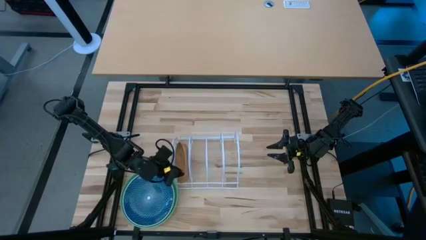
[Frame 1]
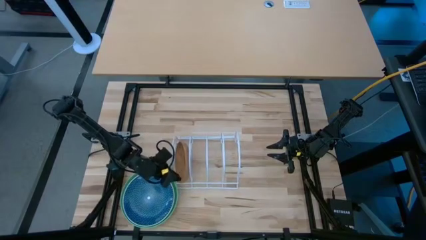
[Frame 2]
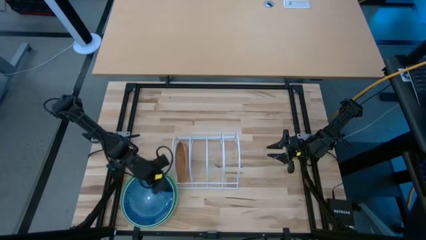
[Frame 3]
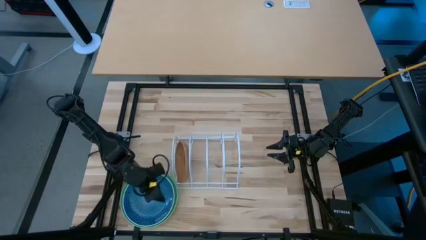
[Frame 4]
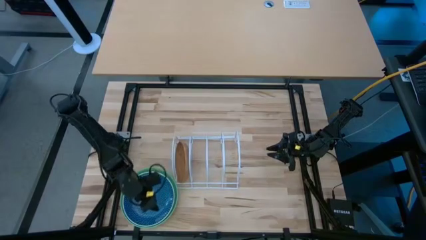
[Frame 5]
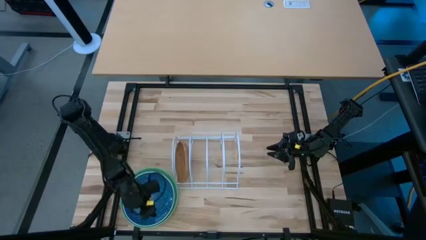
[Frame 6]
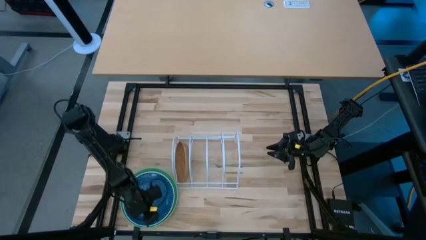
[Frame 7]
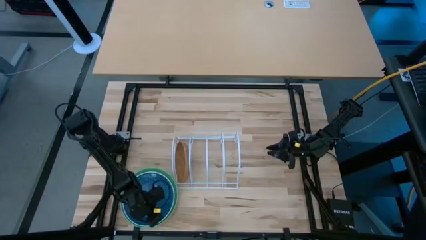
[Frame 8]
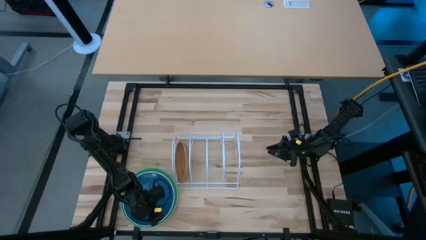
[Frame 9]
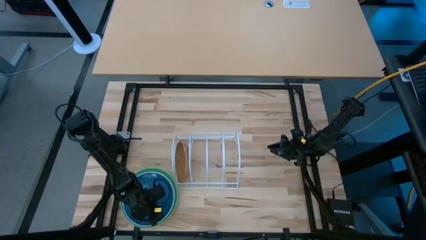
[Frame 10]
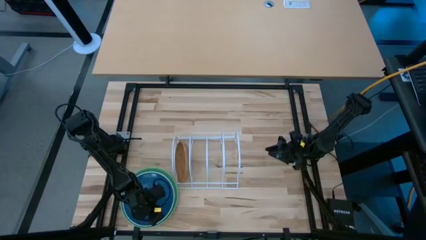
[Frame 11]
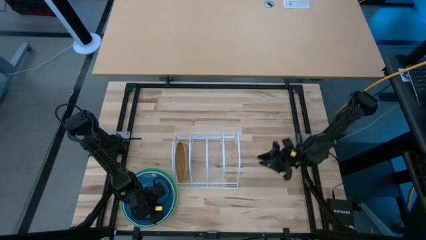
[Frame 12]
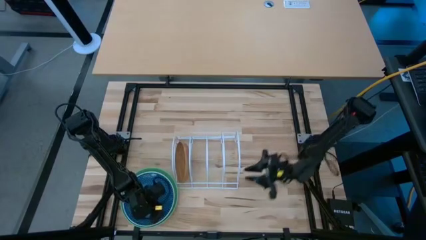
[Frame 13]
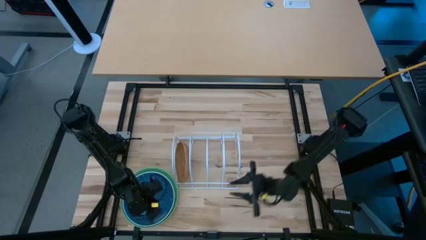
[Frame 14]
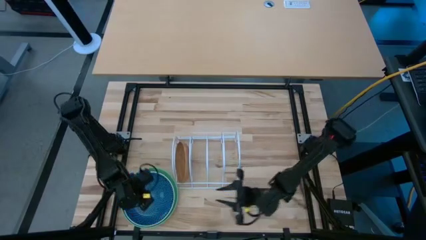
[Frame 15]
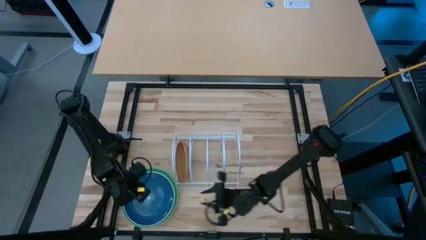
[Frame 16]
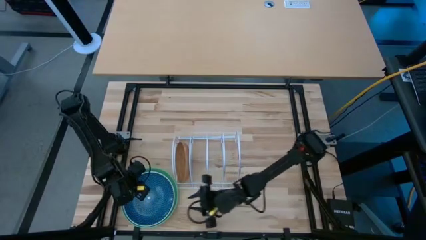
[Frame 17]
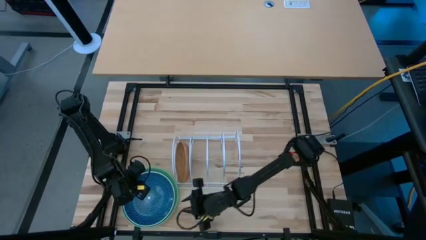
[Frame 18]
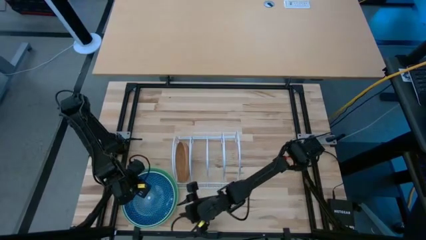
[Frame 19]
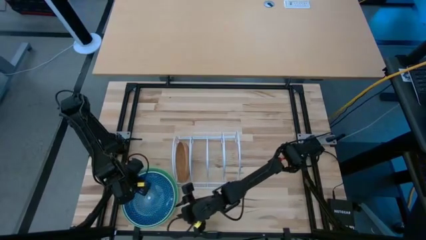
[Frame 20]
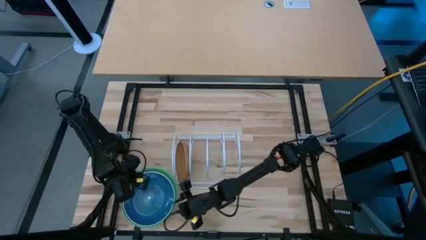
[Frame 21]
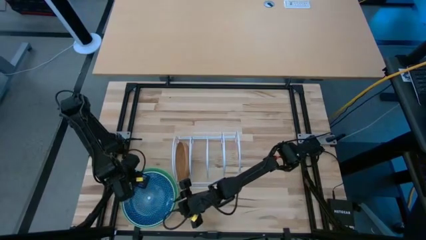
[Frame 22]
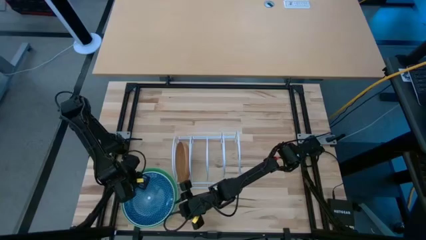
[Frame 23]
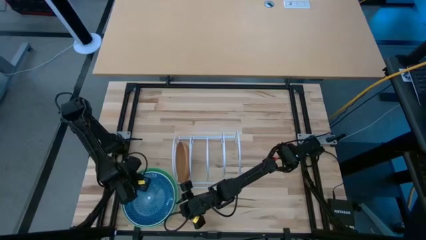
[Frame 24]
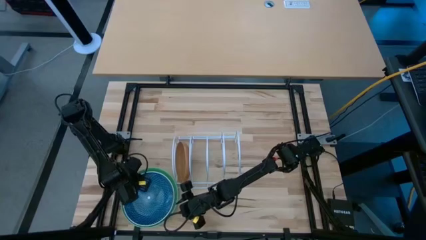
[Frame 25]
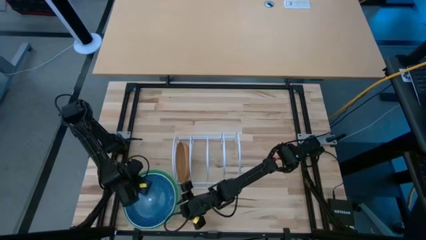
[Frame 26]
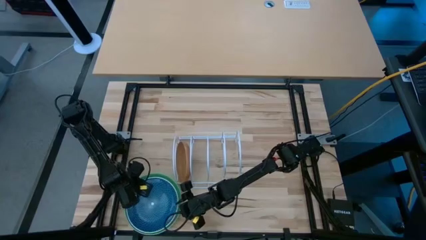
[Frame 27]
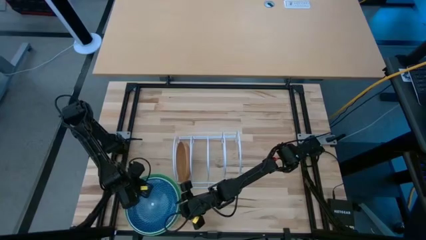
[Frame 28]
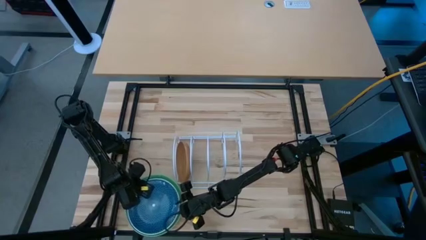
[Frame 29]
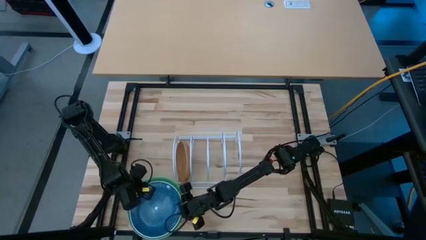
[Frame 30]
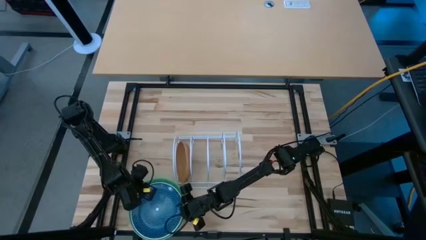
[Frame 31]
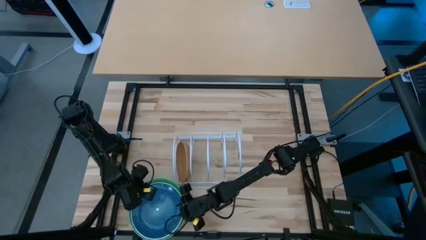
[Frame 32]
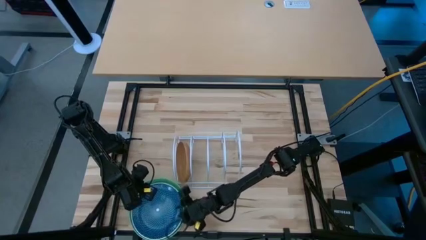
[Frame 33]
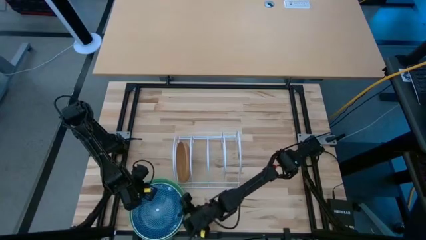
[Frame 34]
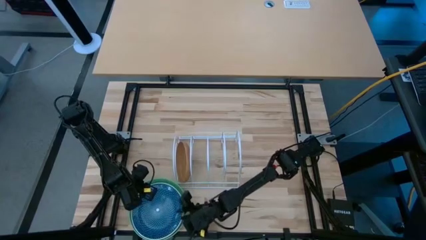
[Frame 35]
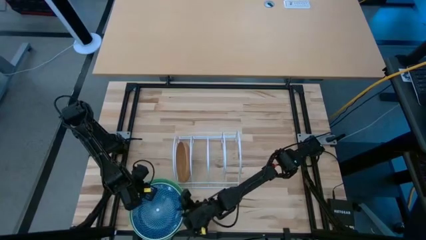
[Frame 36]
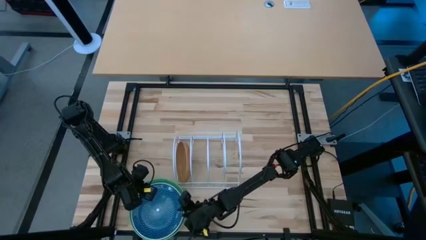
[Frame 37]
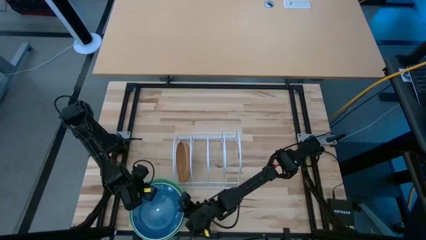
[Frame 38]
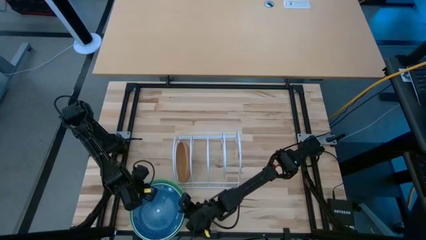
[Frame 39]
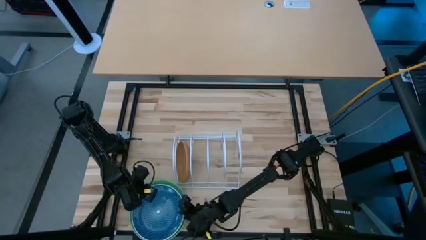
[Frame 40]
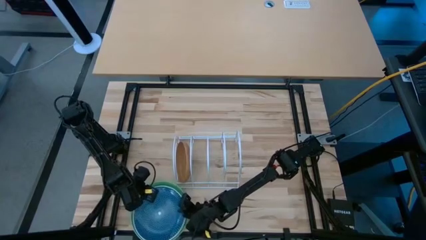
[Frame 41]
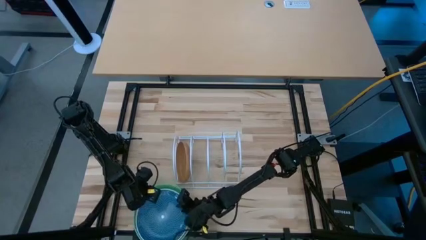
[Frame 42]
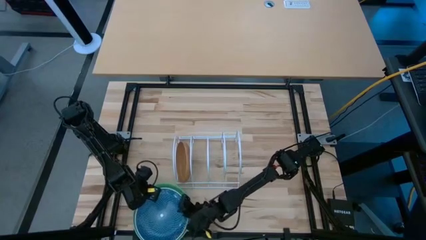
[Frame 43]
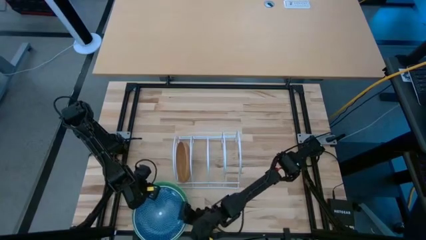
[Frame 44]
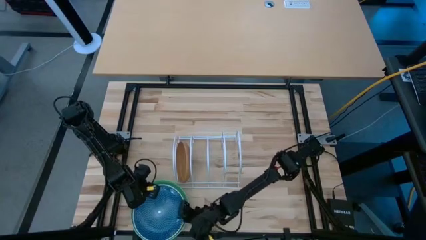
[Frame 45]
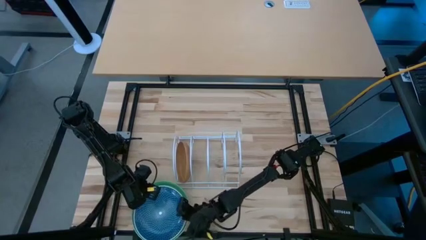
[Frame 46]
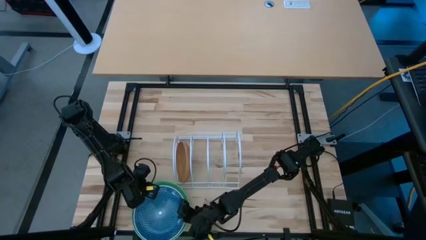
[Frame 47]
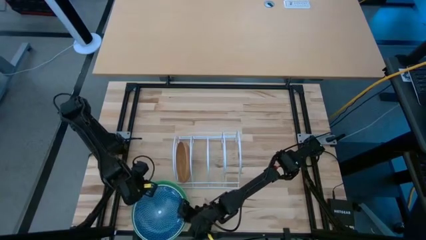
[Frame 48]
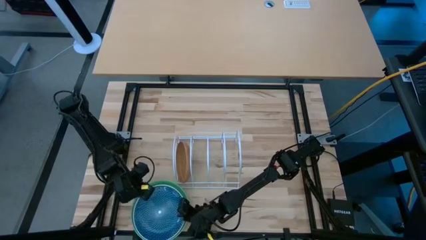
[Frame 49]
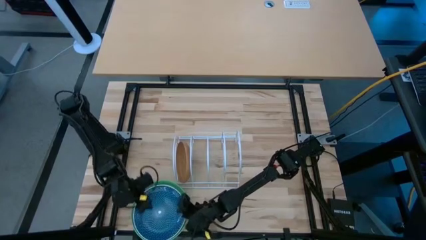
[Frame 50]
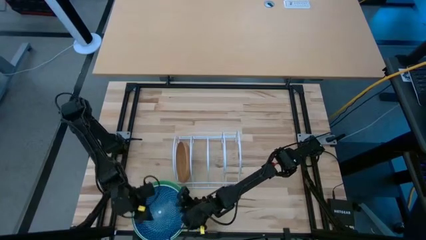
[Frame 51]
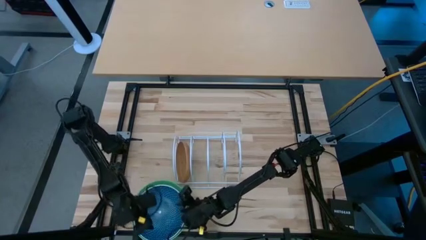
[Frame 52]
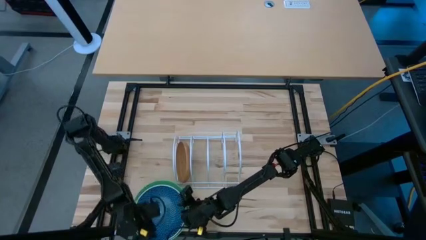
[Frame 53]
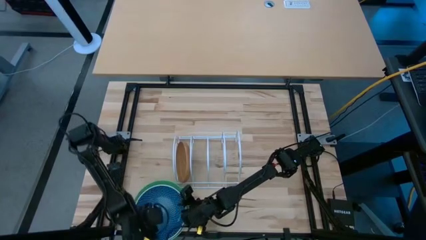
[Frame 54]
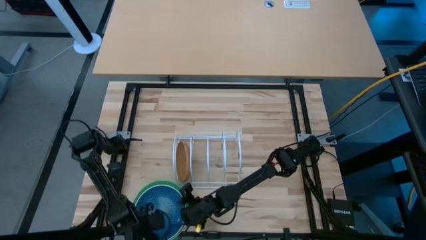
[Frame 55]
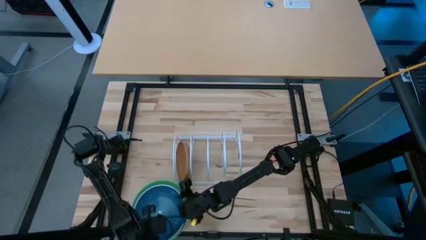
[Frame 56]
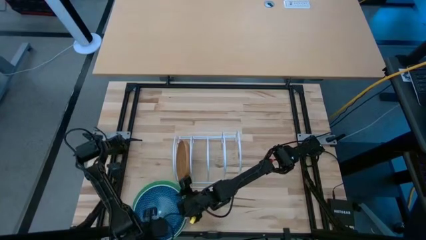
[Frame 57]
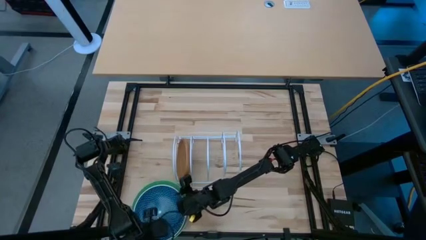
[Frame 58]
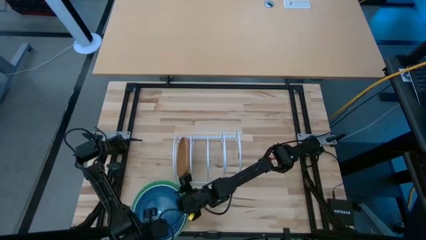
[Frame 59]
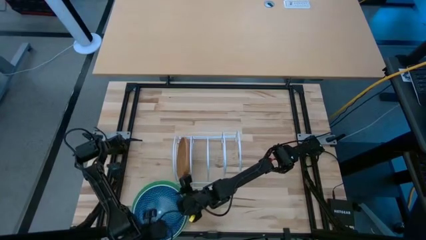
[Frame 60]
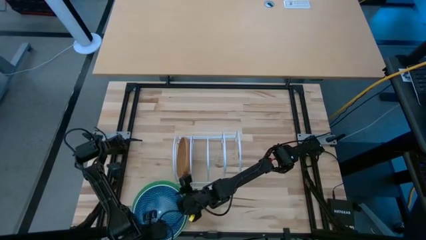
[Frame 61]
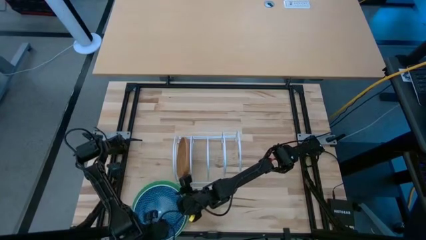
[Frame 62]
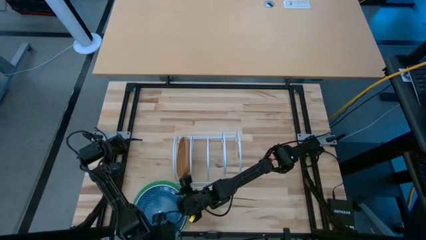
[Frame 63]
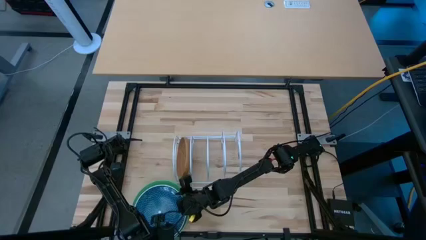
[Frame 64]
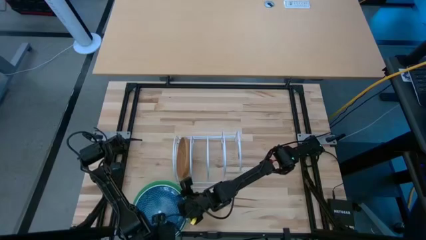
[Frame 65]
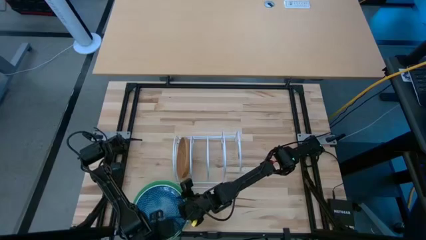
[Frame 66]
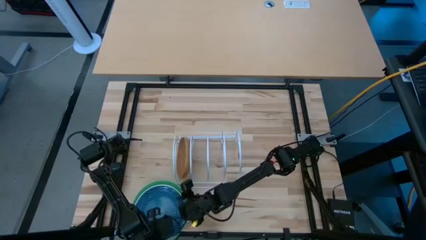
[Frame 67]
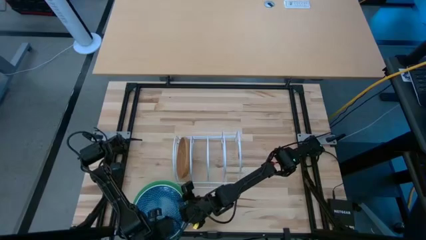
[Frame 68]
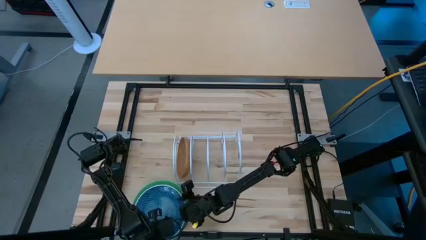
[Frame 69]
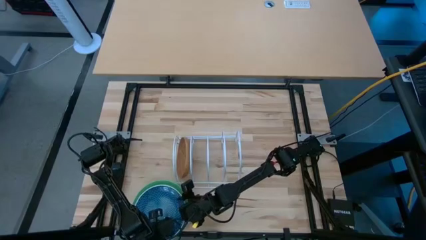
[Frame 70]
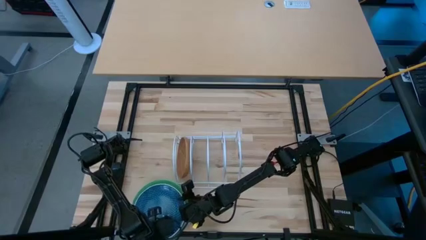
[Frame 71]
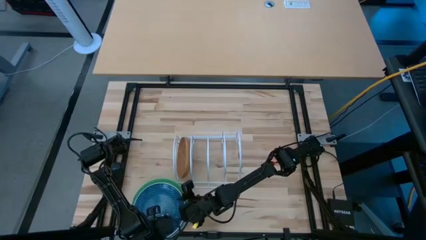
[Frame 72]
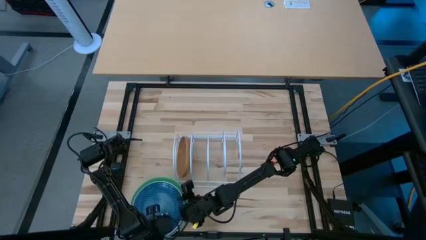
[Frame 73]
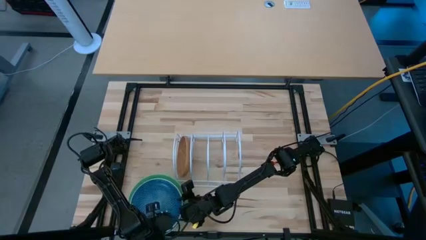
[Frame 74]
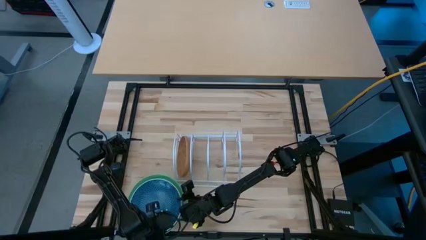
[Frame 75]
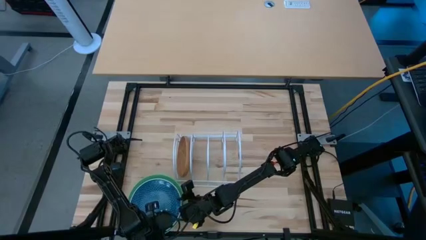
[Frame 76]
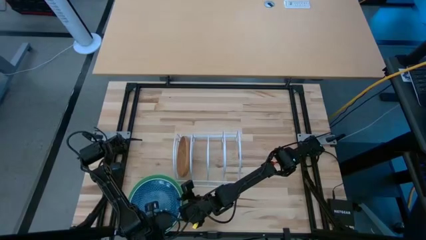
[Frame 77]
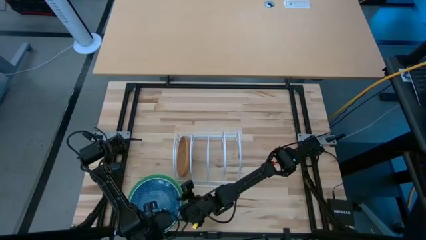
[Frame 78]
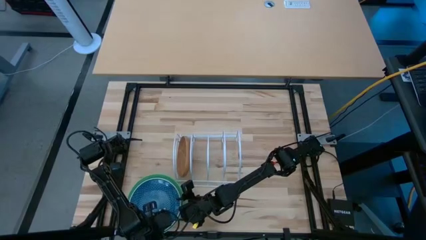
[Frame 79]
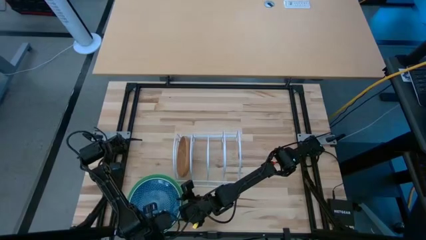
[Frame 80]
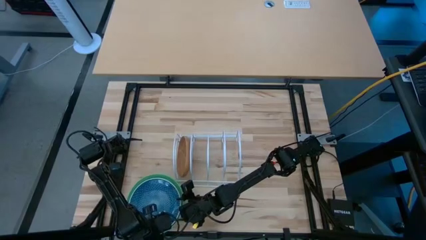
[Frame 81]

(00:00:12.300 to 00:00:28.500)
Task: Sort dishes
Put the blue plate into the dish rack
